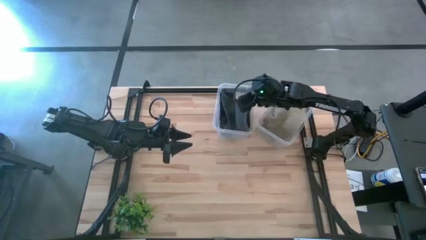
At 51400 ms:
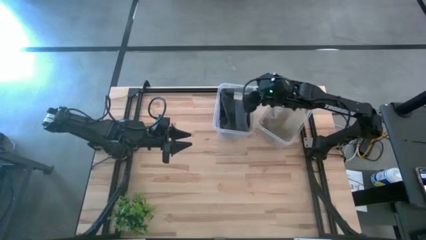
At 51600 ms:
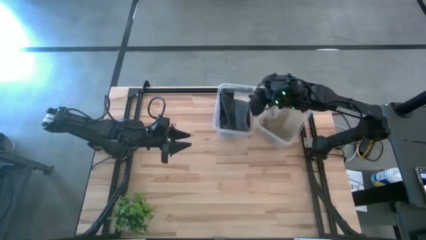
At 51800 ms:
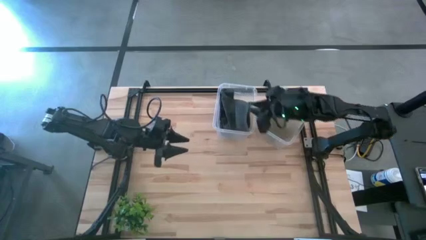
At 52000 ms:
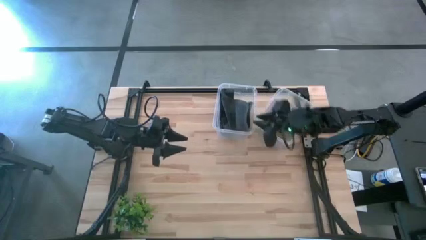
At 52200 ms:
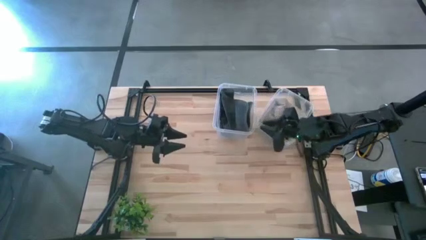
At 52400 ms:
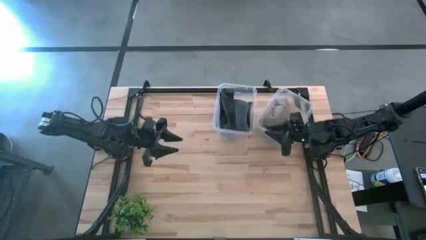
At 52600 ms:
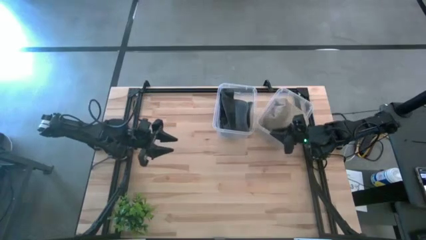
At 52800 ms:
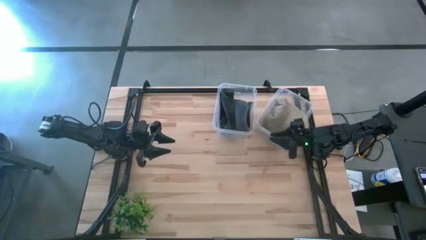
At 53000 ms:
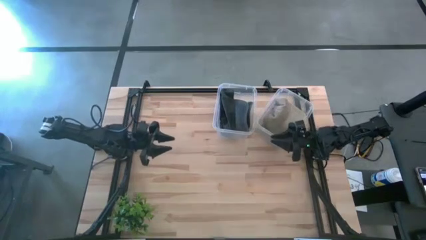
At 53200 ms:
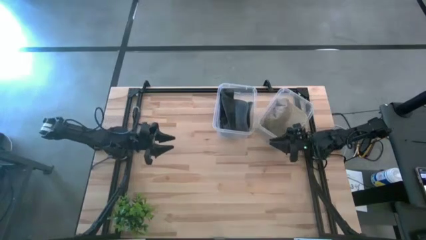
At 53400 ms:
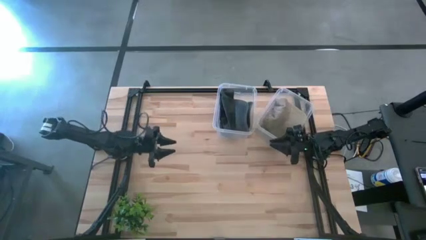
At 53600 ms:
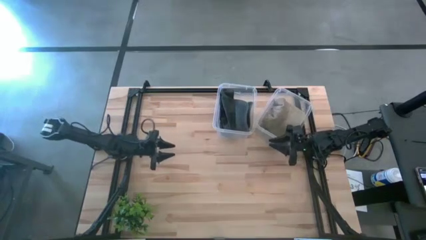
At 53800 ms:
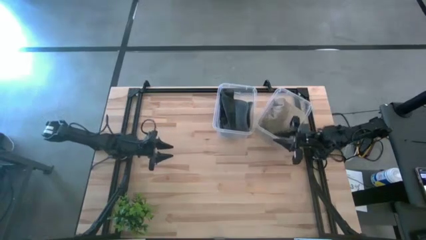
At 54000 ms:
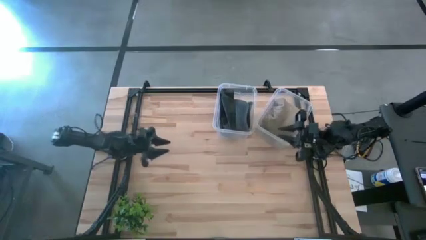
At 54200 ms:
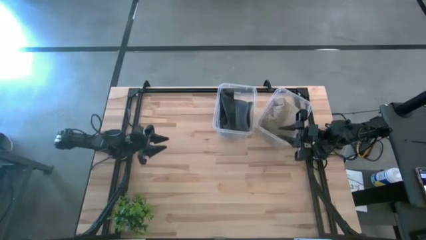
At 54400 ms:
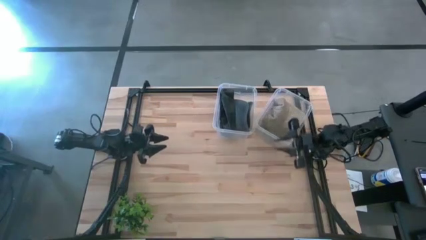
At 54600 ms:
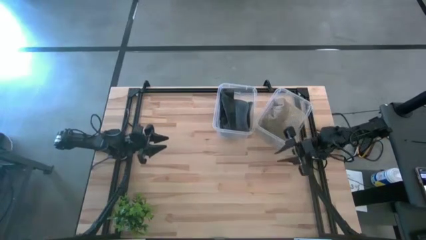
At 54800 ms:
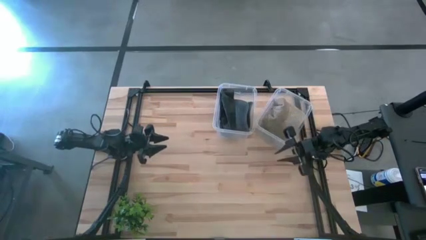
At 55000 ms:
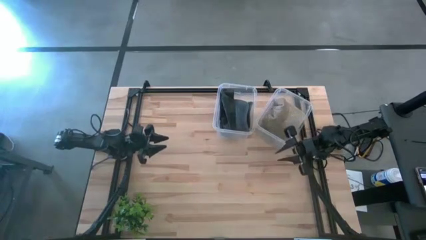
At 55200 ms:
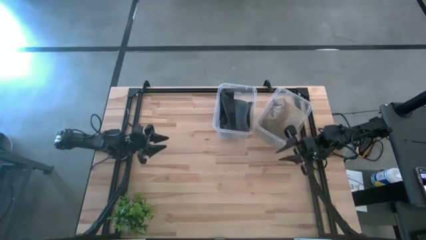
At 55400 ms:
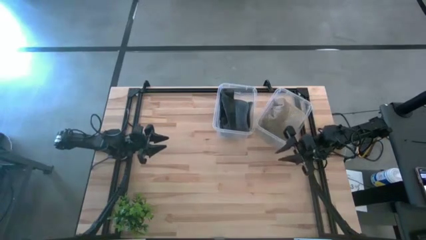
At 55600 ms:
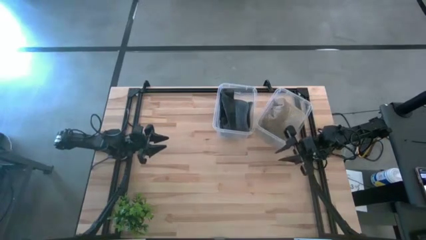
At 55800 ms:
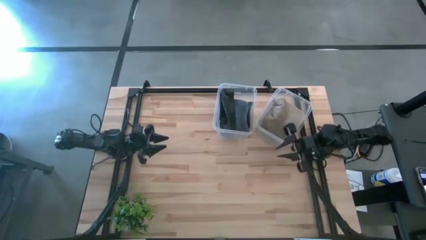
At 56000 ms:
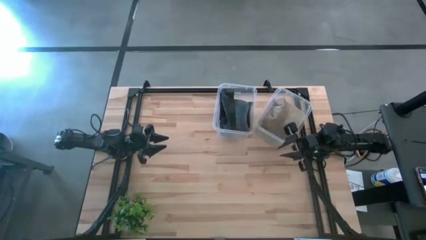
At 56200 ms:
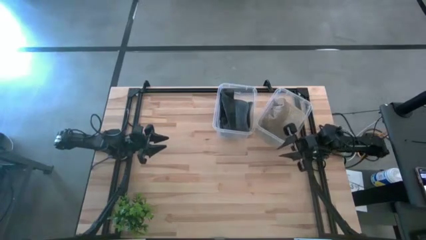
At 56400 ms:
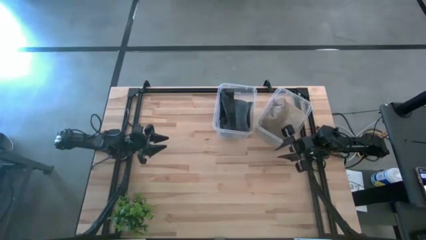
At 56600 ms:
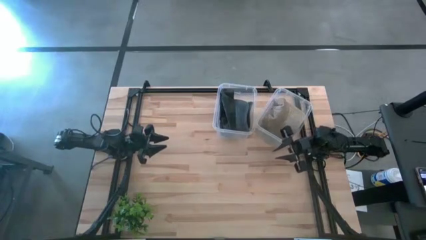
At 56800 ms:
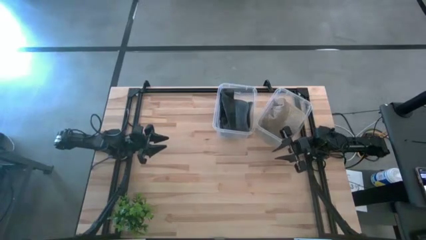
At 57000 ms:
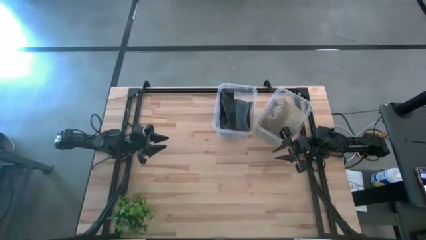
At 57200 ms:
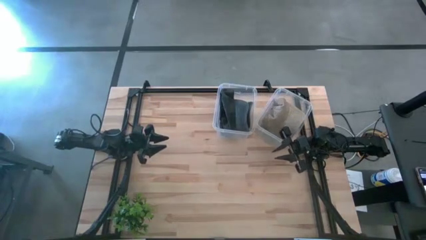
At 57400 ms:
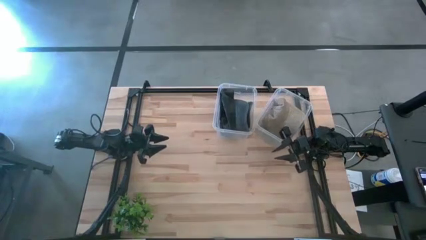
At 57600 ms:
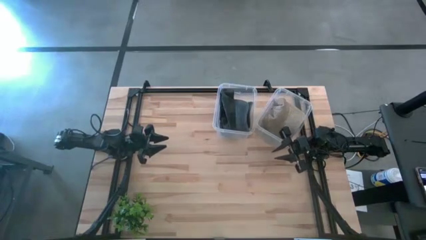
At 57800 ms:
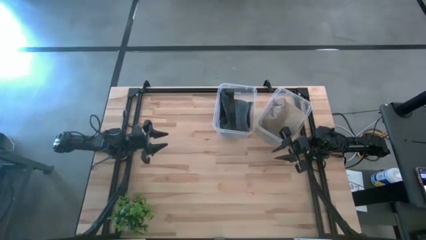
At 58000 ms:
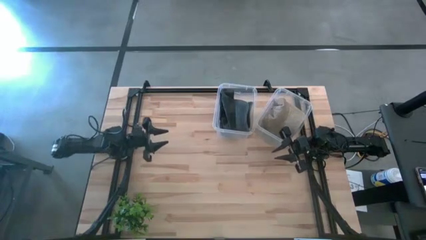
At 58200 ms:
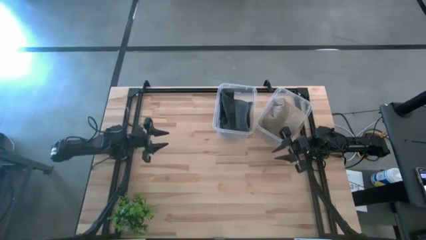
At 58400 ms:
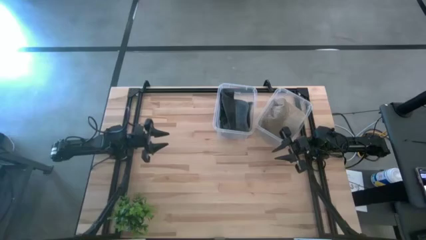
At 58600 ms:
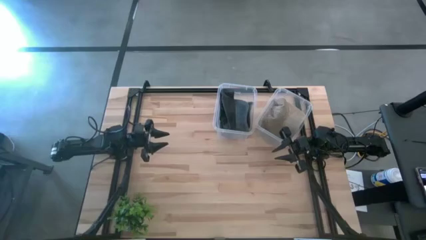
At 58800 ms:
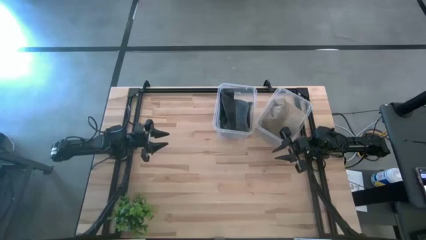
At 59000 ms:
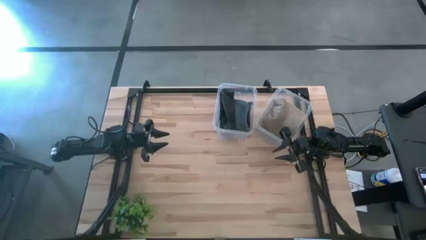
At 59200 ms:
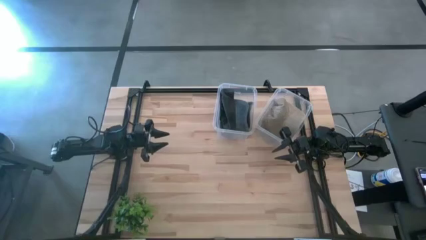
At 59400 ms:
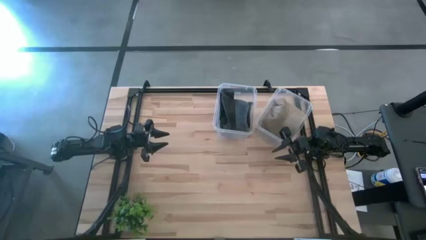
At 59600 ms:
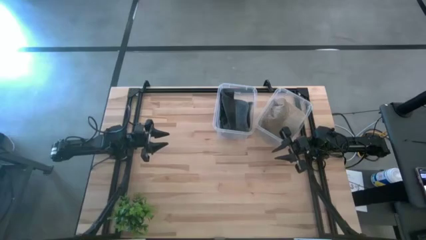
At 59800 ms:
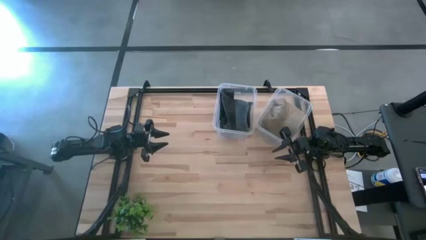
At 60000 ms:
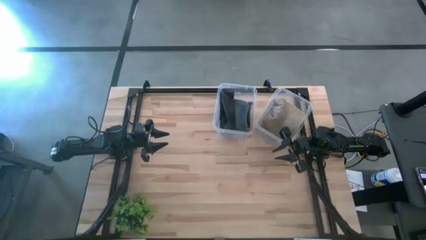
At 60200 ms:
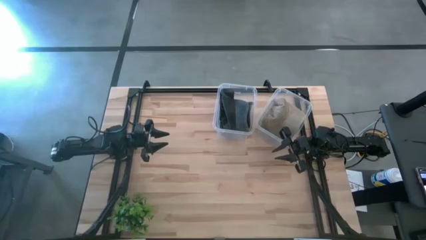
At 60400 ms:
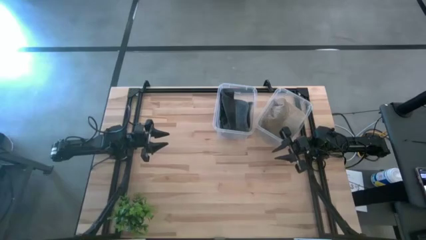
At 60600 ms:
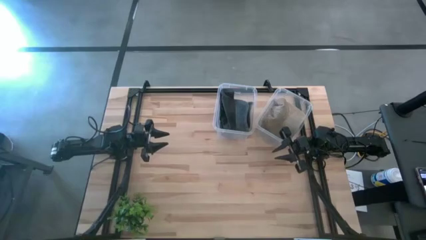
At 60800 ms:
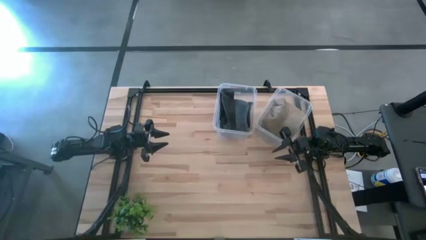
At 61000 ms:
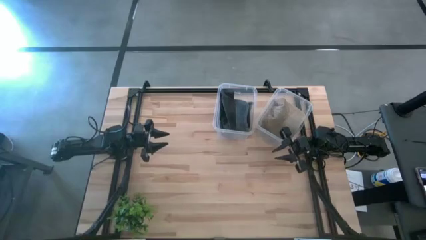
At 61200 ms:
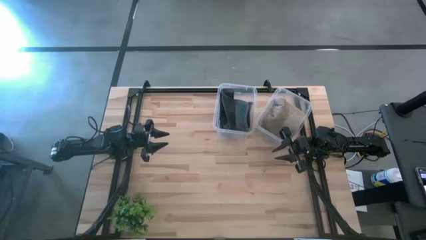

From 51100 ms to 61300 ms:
Task: Pick & Place hat
Return to Home Position
